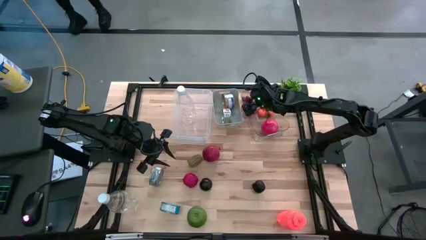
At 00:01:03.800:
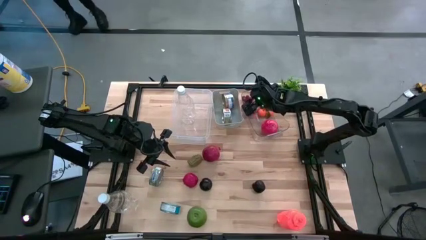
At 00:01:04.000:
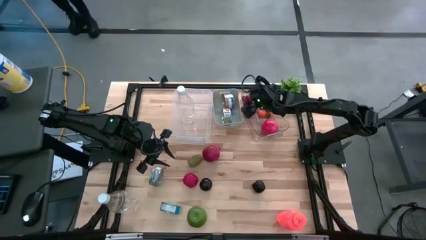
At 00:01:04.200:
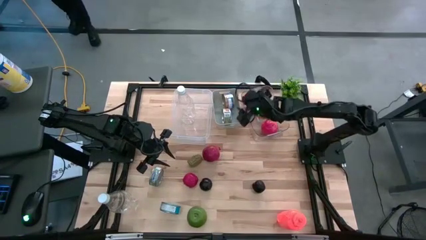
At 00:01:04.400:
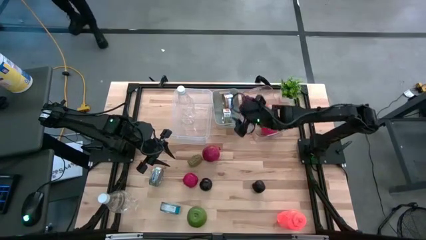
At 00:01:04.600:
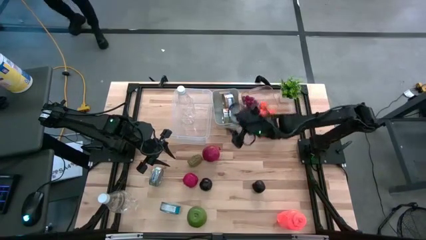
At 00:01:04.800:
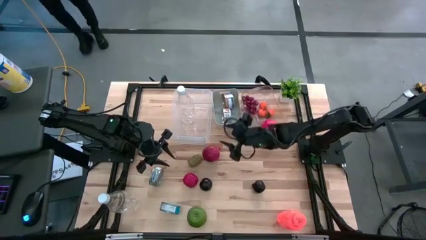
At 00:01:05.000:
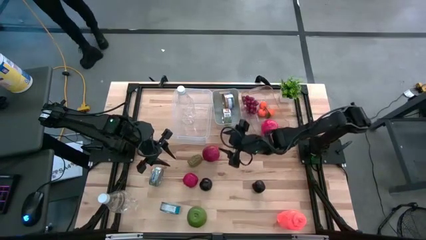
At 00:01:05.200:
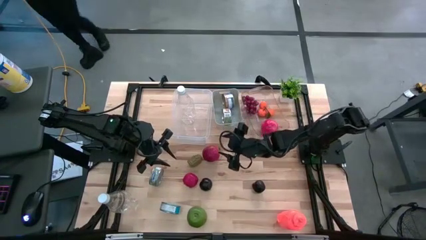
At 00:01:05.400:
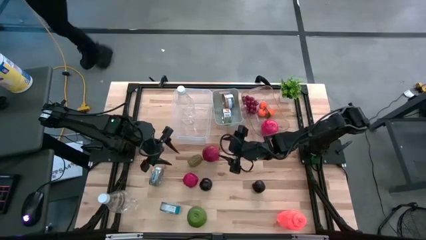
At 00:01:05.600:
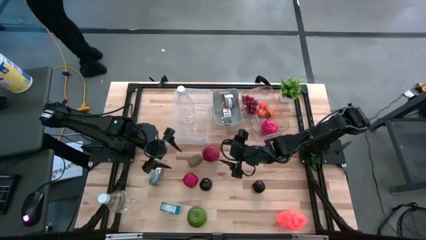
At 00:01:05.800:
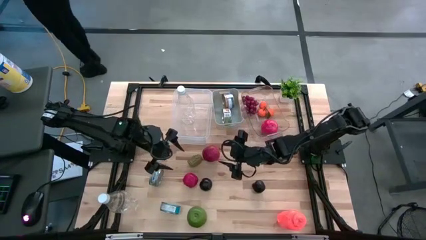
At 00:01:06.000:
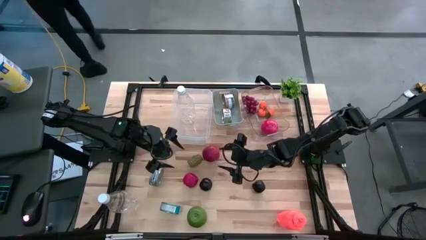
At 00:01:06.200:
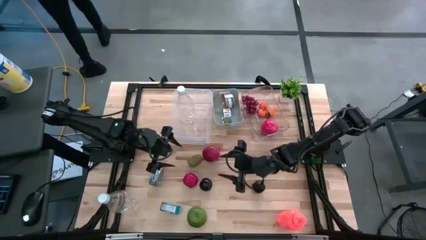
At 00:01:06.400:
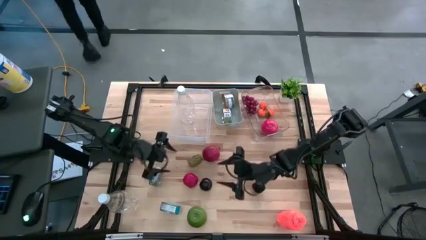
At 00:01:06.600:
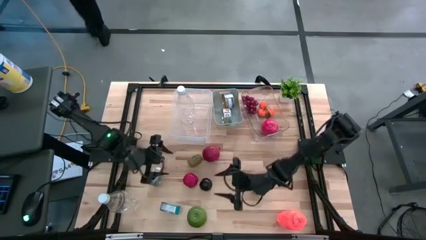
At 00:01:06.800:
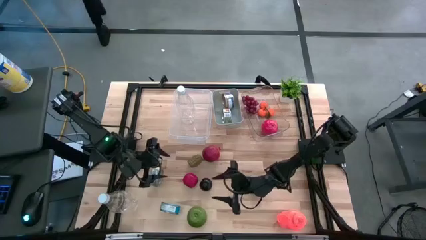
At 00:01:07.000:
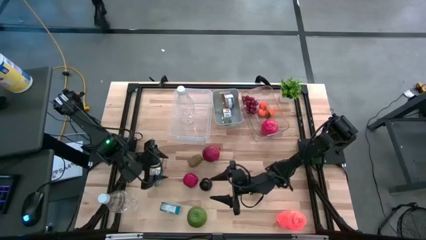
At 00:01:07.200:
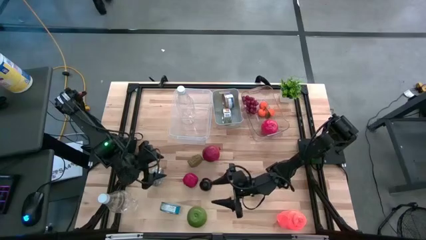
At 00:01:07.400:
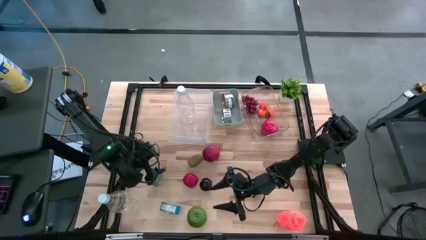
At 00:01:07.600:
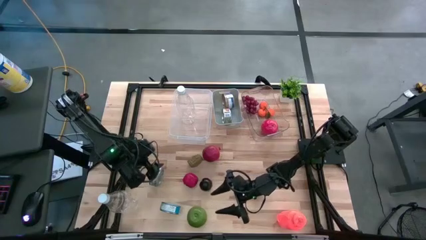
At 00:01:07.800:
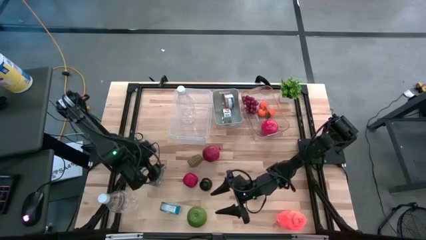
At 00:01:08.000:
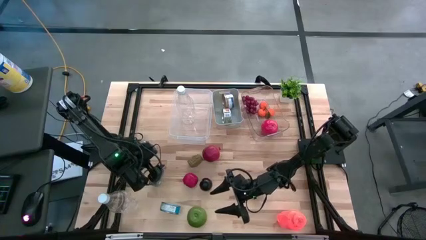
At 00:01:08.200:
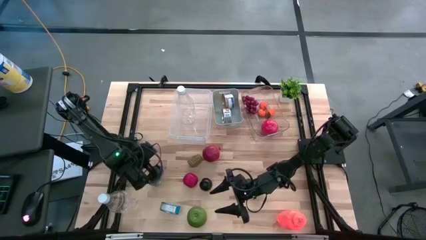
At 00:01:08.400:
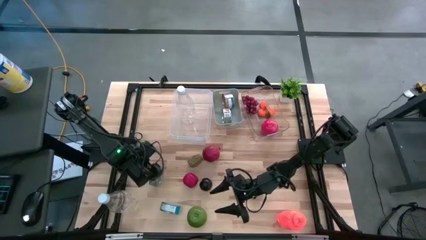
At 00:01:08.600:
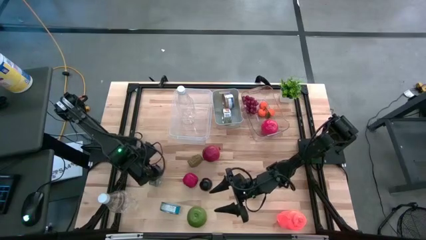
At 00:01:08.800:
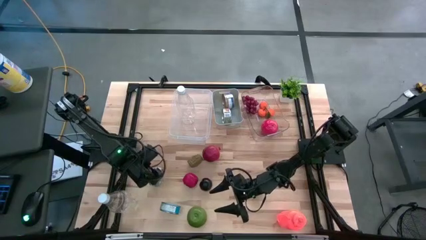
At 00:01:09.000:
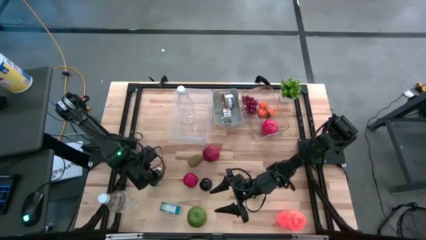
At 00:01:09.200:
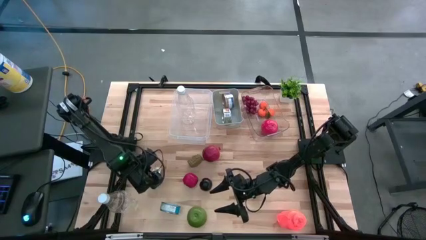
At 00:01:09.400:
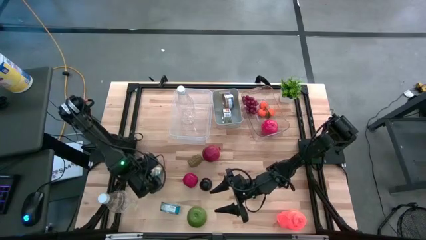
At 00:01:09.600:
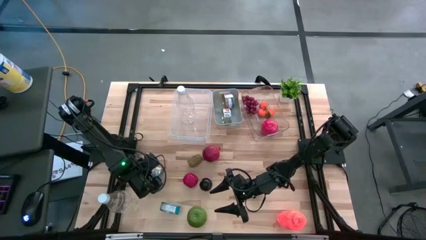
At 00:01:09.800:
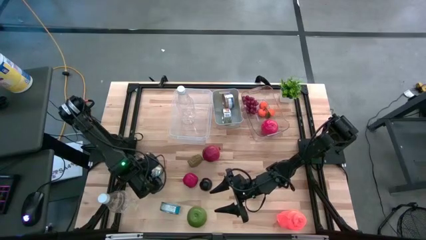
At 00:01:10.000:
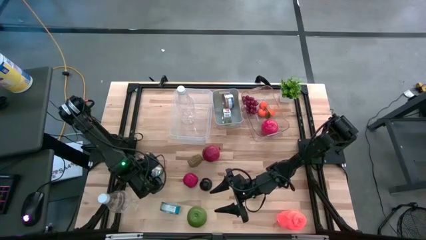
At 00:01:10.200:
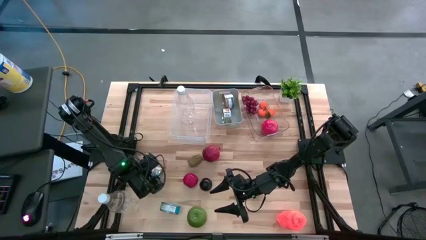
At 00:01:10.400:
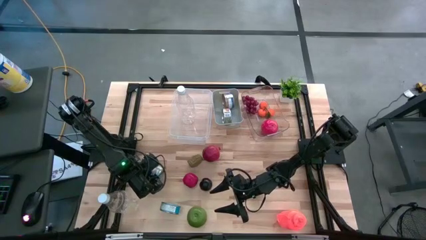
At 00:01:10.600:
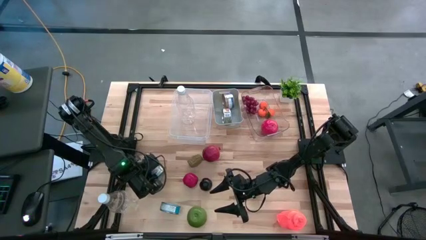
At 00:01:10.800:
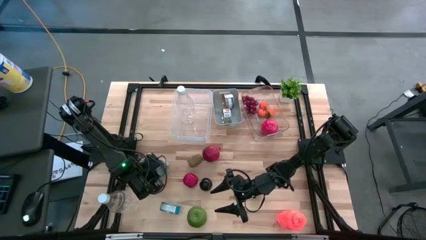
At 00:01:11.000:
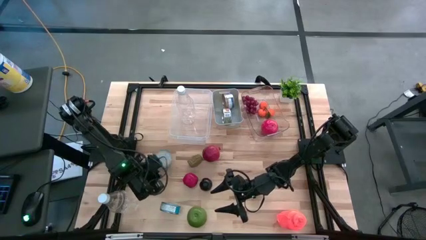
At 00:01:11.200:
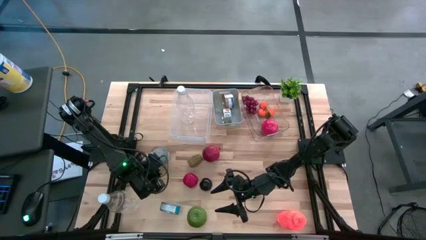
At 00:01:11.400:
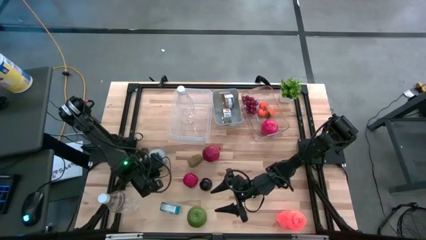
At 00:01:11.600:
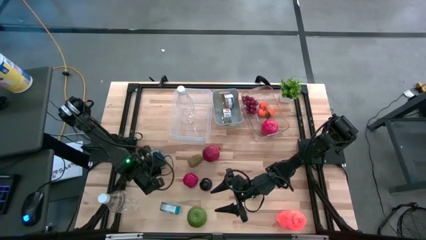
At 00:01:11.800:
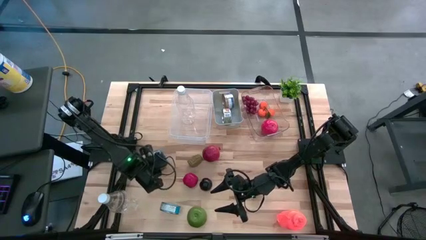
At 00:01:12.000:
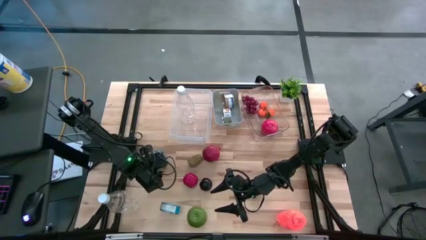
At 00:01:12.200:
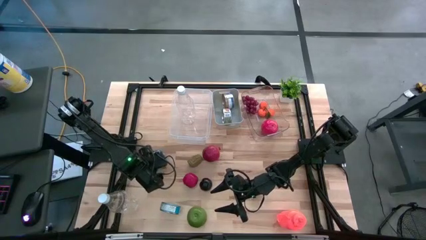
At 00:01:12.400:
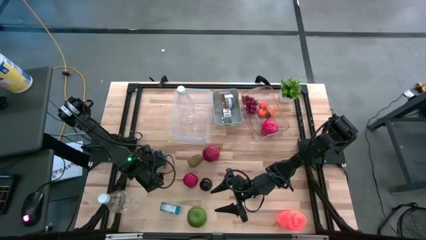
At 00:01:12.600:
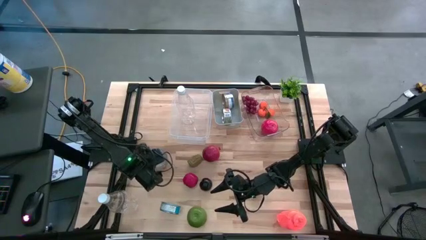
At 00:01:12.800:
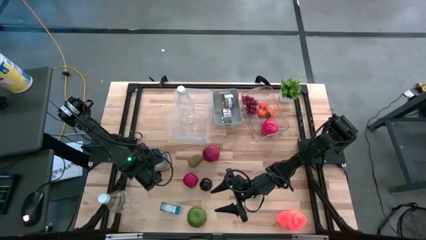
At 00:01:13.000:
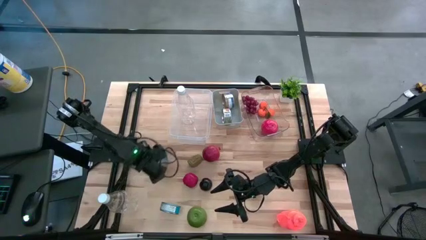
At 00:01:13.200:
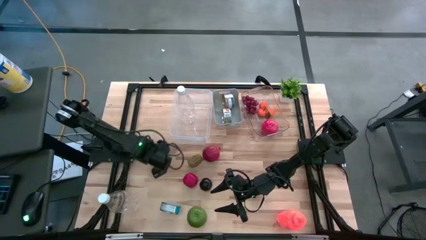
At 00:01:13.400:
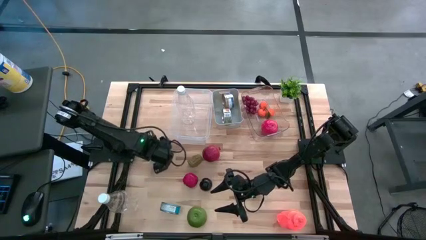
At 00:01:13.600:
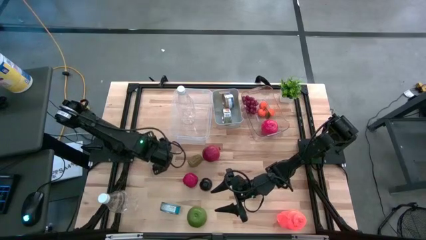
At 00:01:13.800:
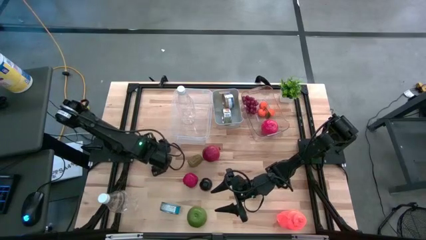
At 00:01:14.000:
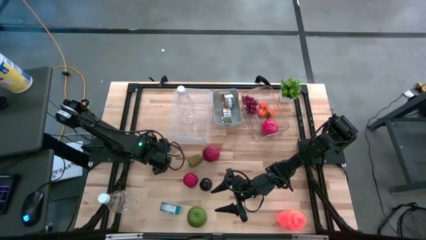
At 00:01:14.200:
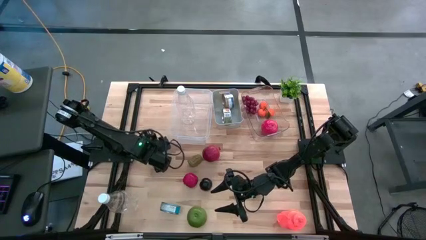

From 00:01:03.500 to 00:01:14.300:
Task: Pick & Place Food Item
Put the green canned tuna into the white bin
